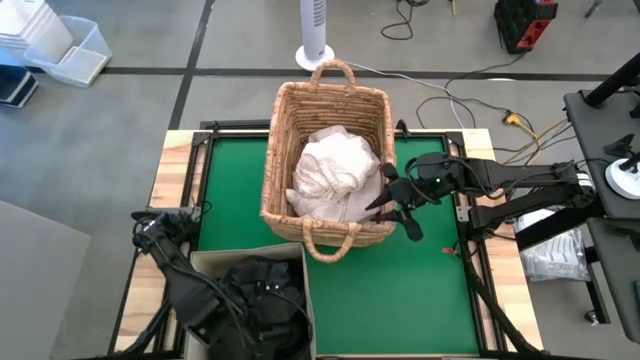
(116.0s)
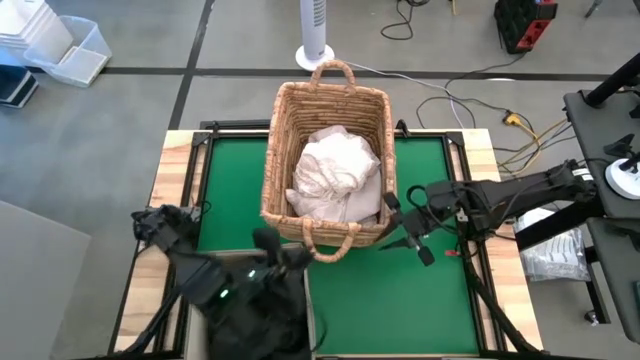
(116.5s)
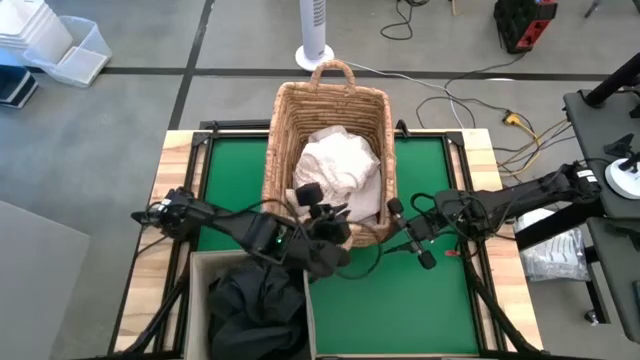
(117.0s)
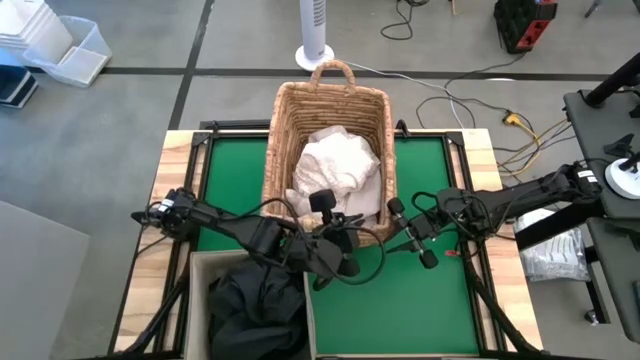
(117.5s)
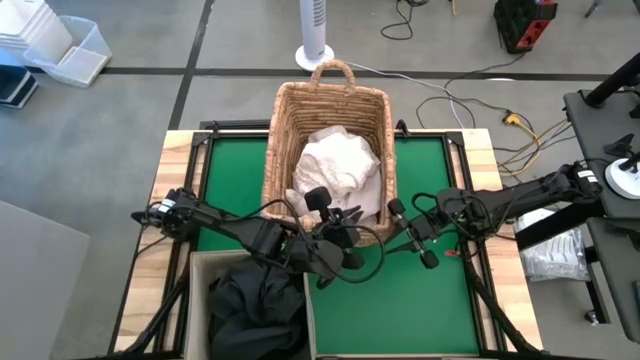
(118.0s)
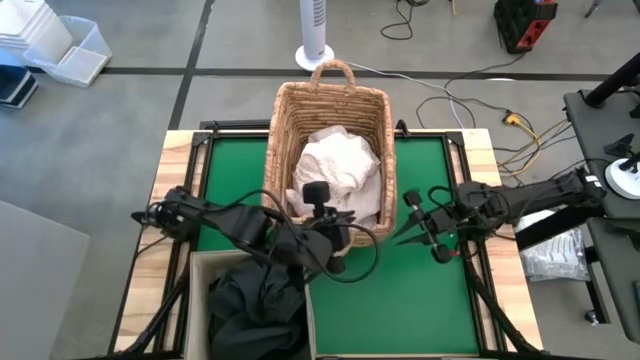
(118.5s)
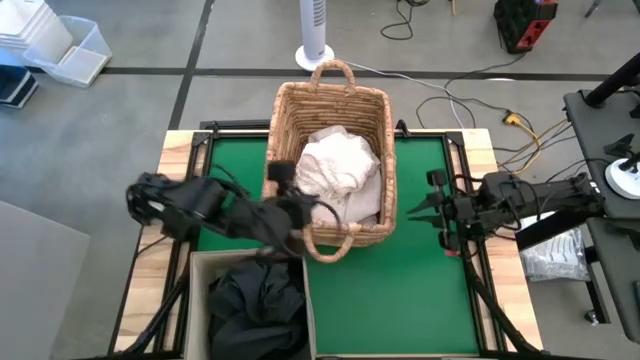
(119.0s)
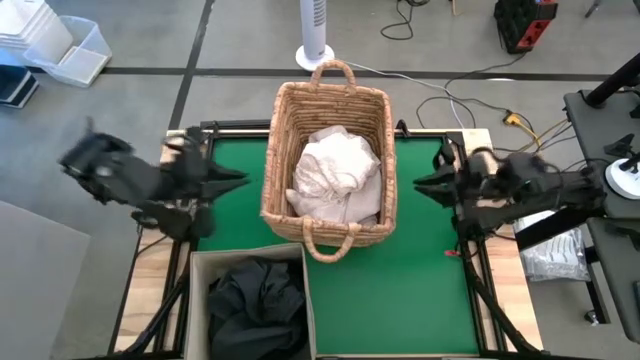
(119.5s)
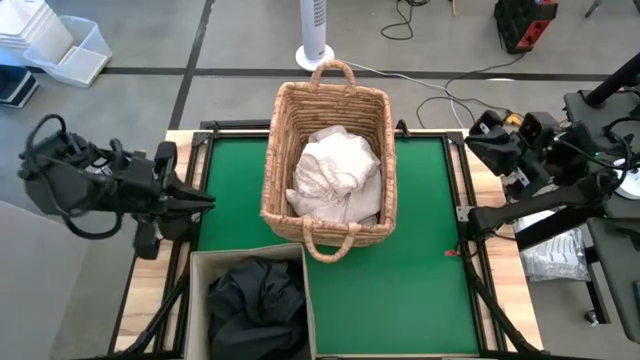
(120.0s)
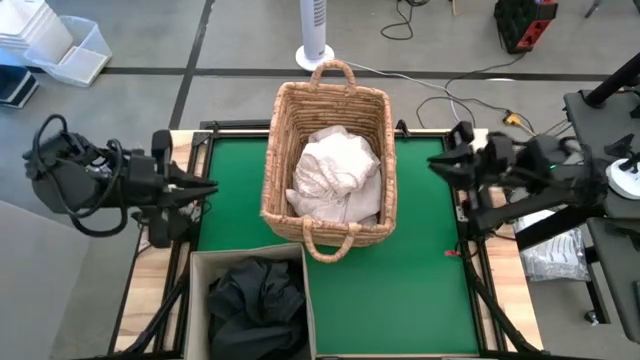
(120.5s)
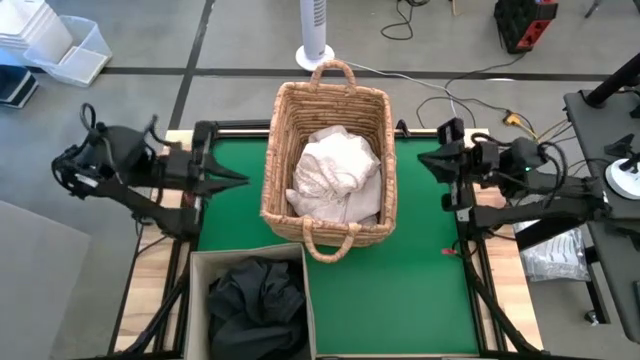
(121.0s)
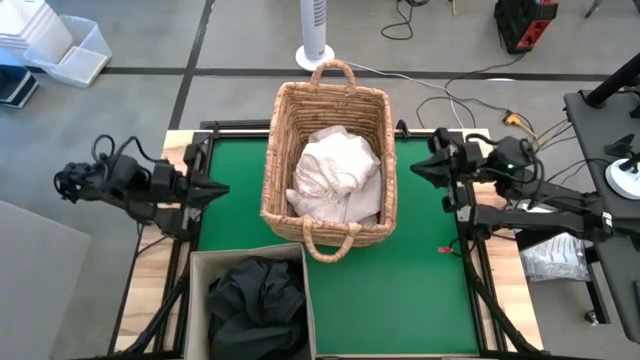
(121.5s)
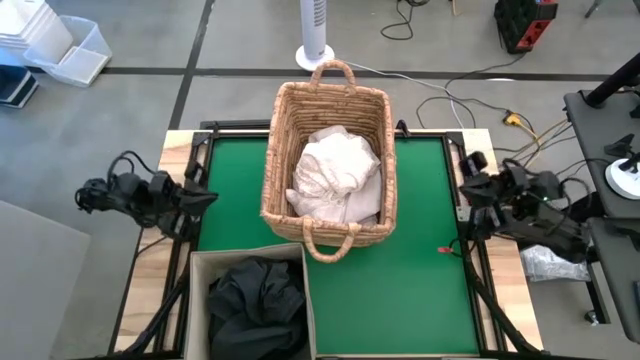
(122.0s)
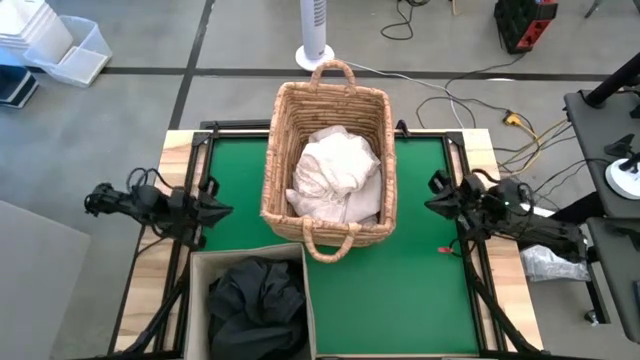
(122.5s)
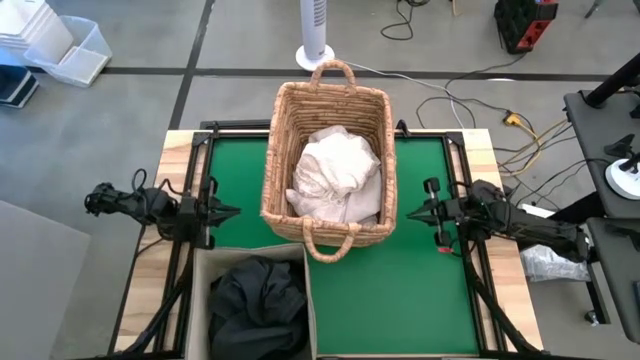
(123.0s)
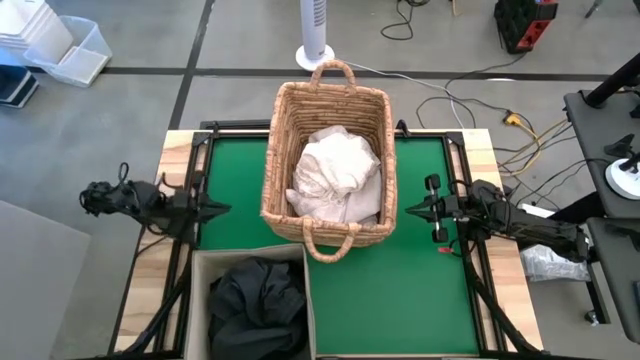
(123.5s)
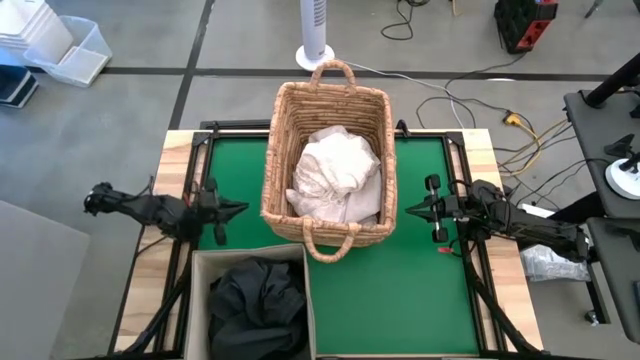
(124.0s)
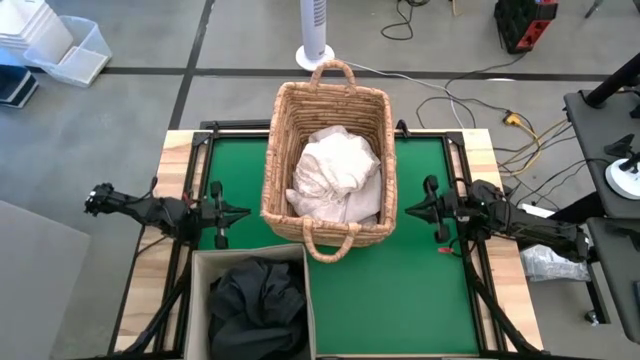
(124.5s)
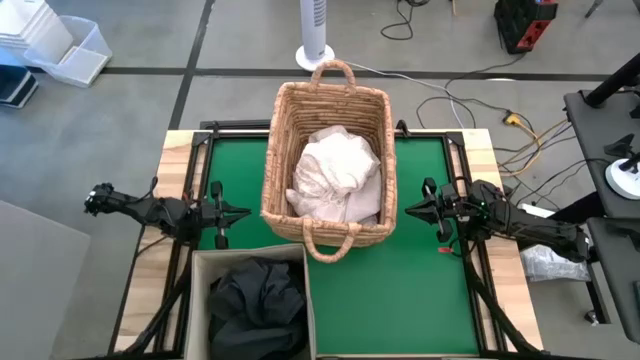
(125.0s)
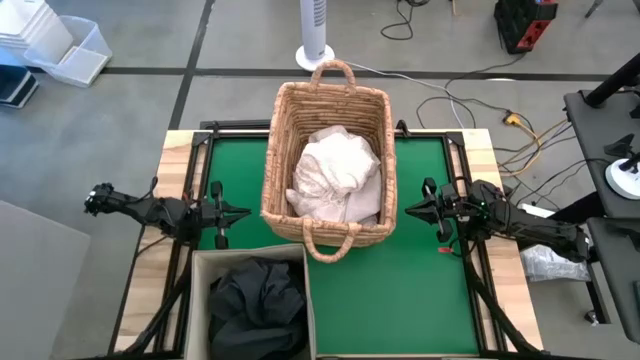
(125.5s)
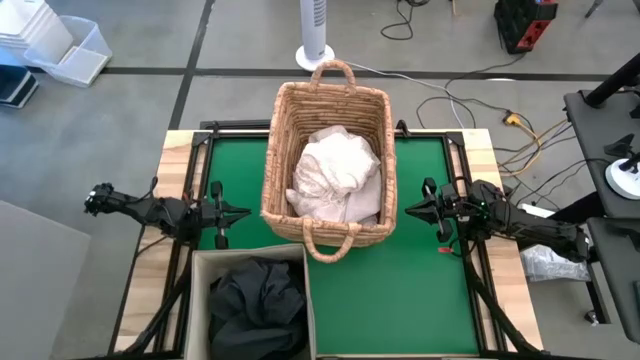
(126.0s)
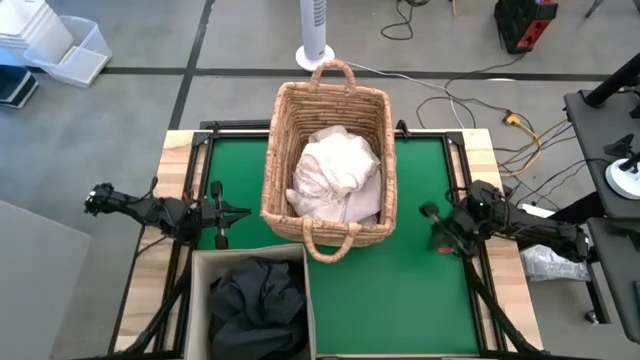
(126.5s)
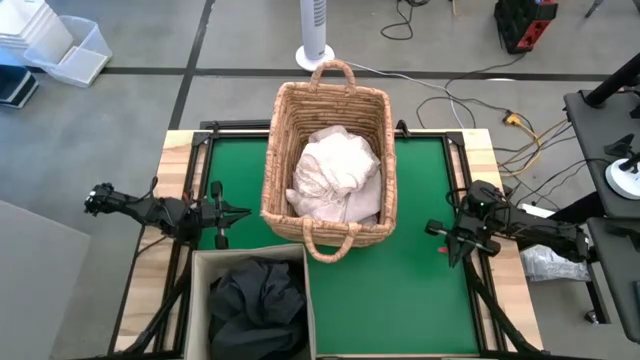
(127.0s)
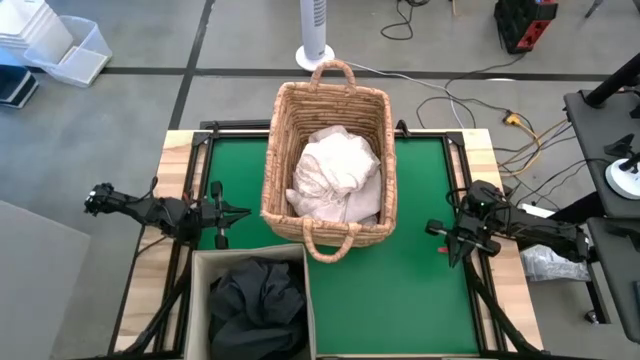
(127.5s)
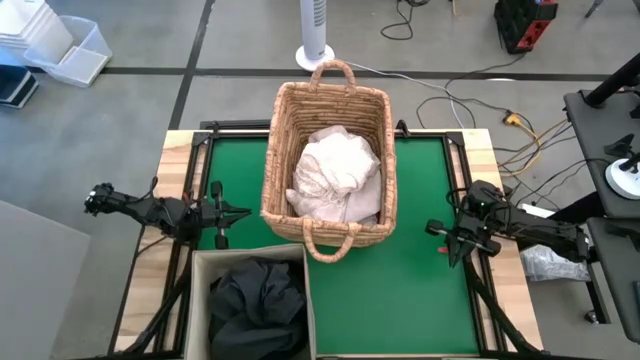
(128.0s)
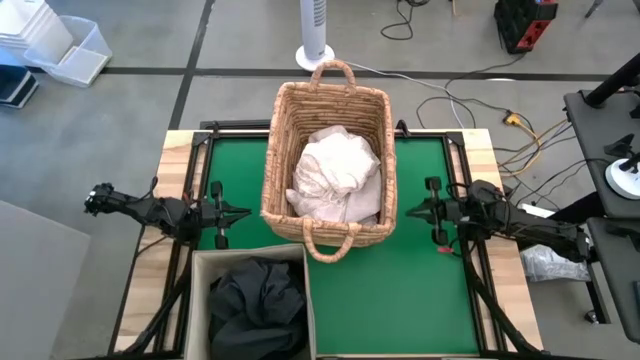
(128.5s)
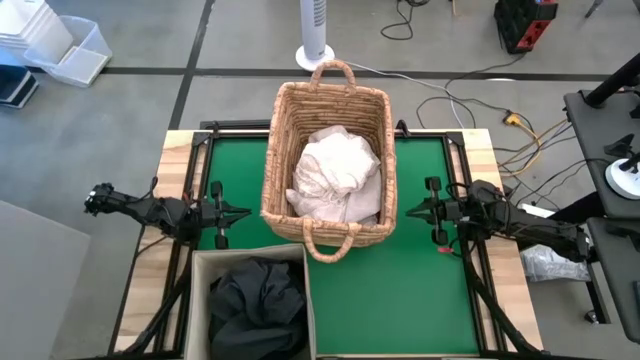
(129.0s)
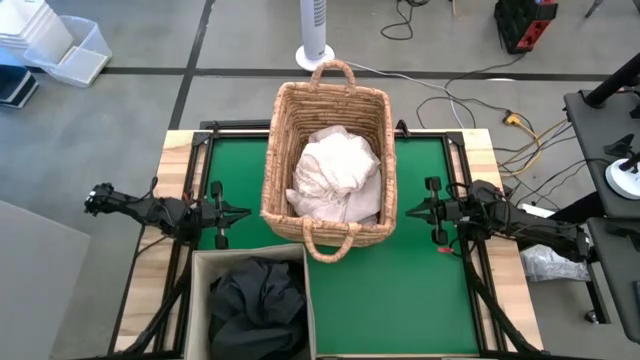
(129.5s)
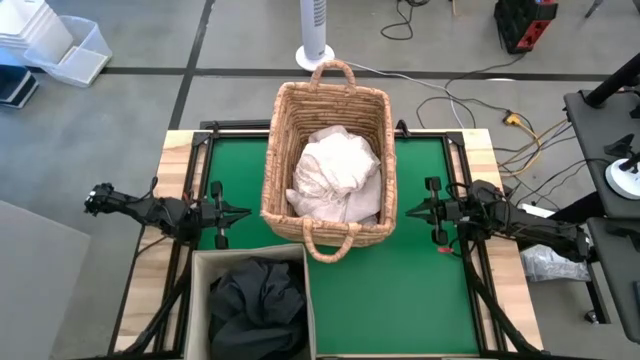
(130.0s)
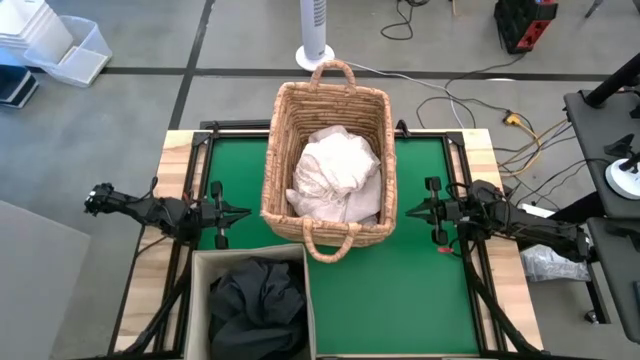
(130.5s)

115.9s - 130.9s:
Return to Home Position
